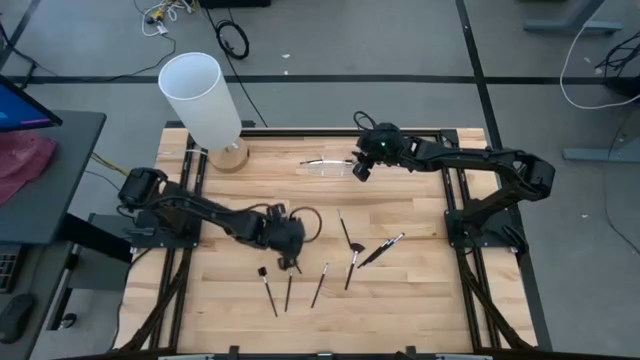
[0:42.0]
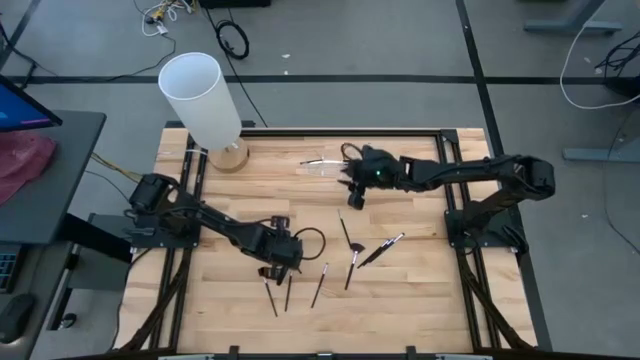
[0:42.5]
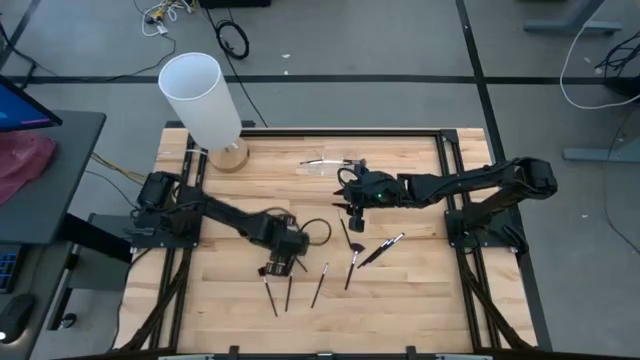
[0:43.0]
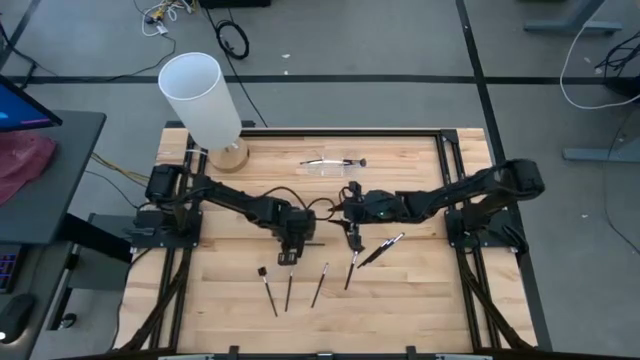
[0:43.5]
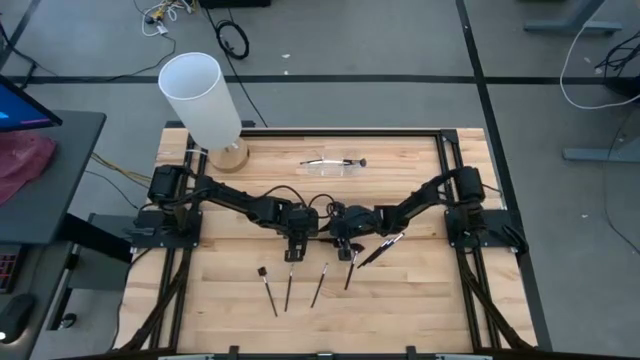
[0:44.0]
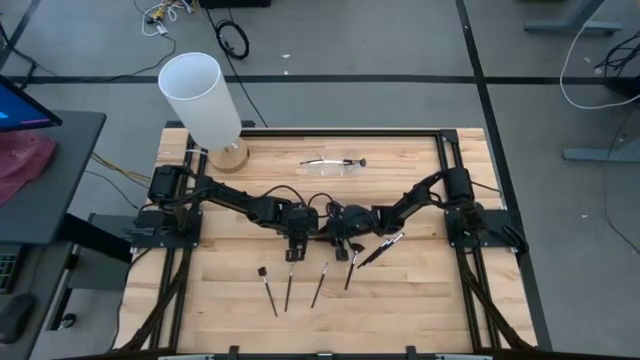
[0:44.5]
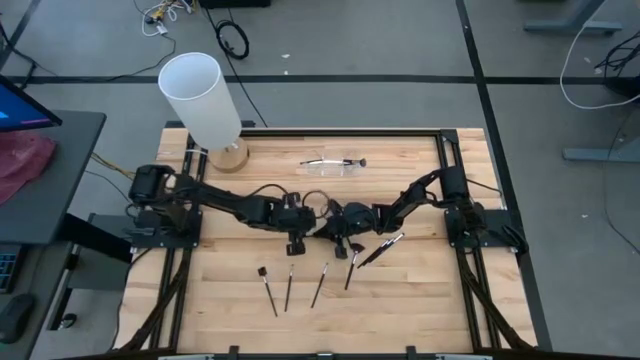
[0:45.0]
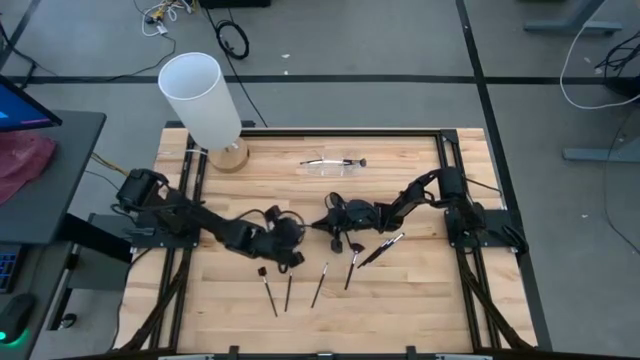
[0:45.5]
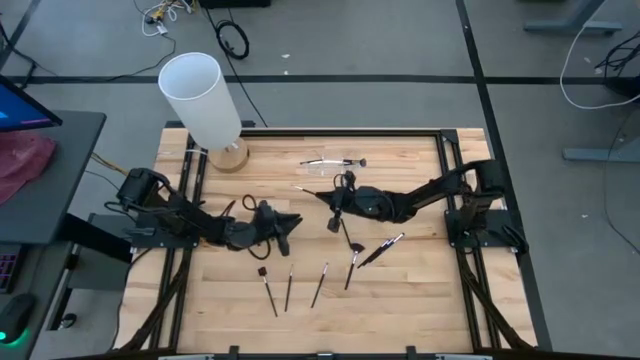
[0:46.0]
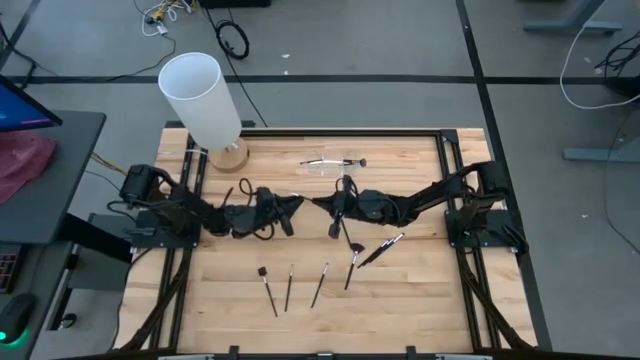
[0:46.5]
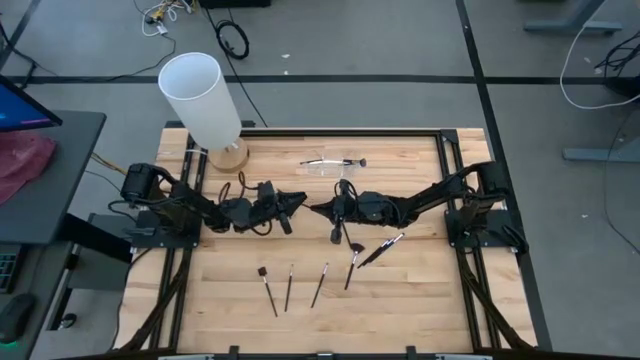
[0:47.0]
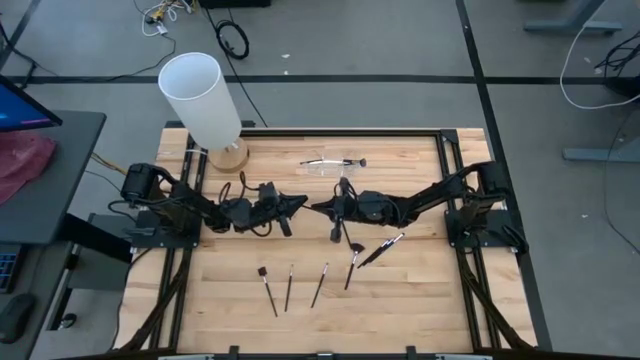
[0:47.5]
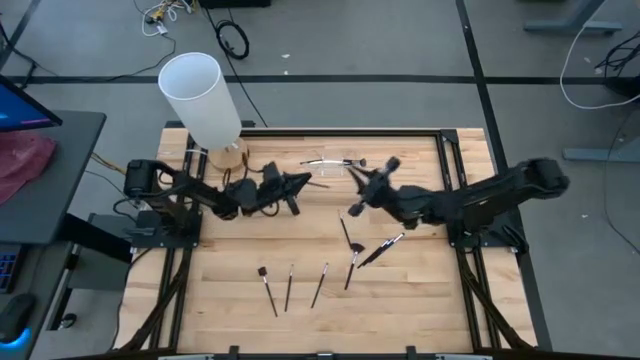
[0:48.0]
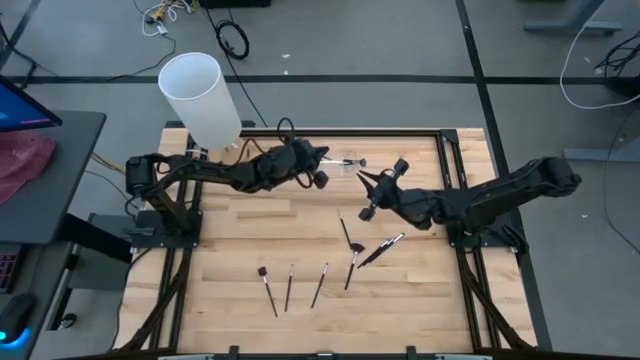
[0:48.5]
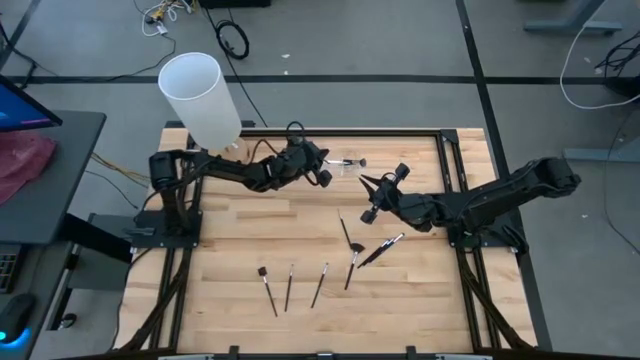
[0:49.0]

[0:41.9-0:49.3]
Task: Pick & Place Makeup Supplies
Put the makeup brush into the transparent organizer

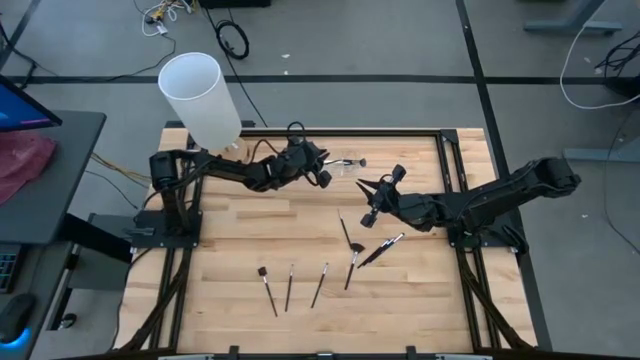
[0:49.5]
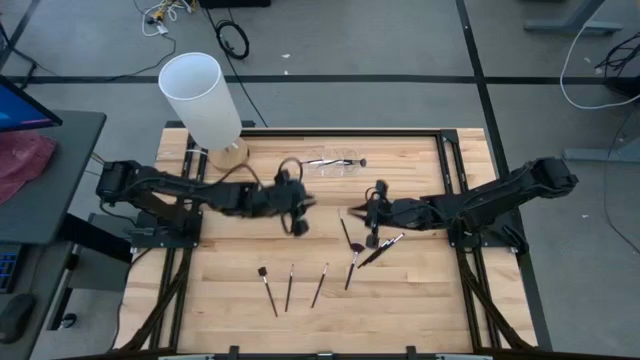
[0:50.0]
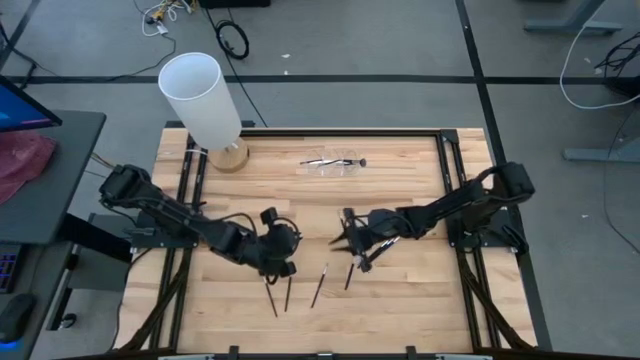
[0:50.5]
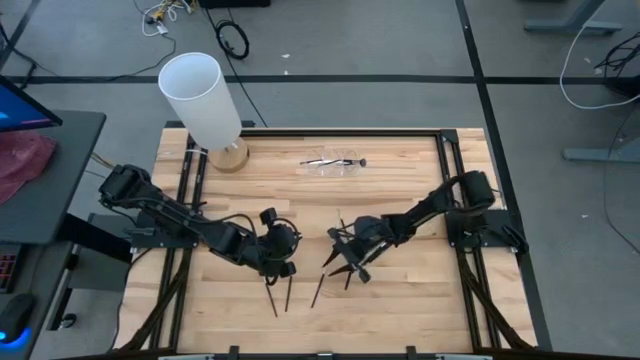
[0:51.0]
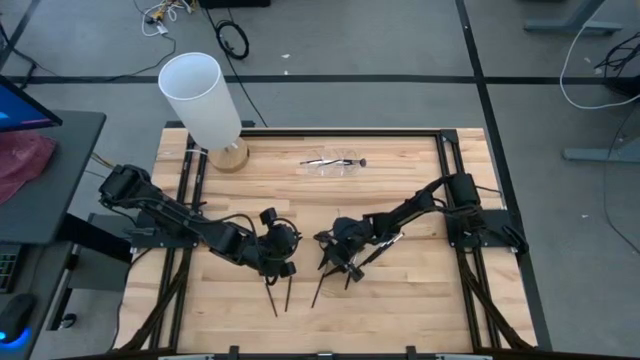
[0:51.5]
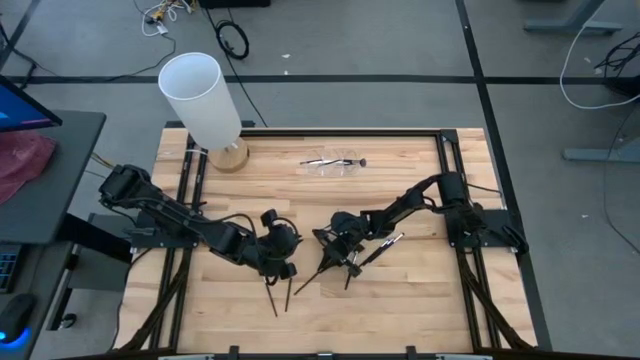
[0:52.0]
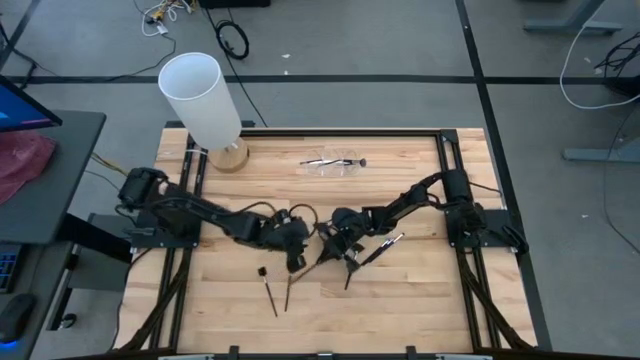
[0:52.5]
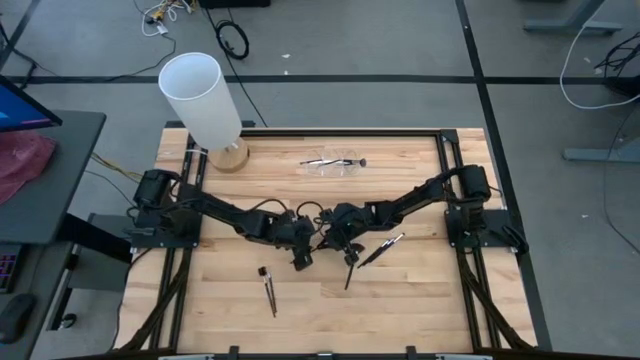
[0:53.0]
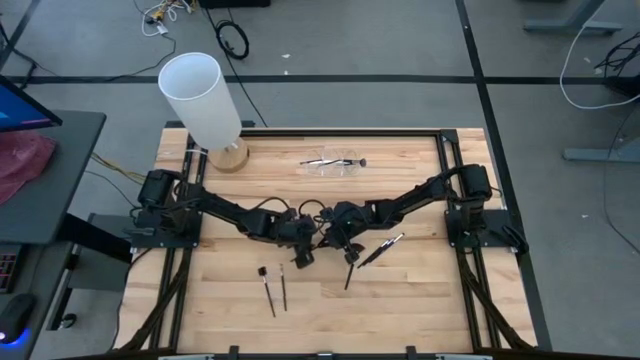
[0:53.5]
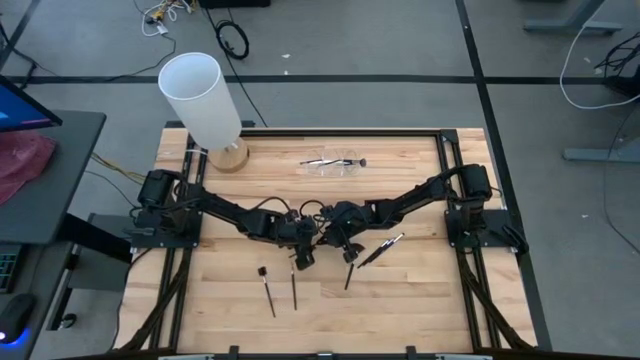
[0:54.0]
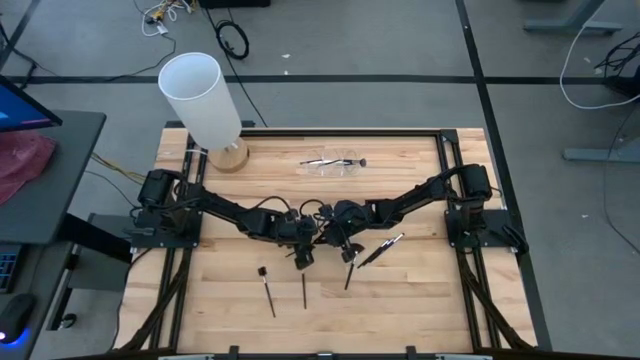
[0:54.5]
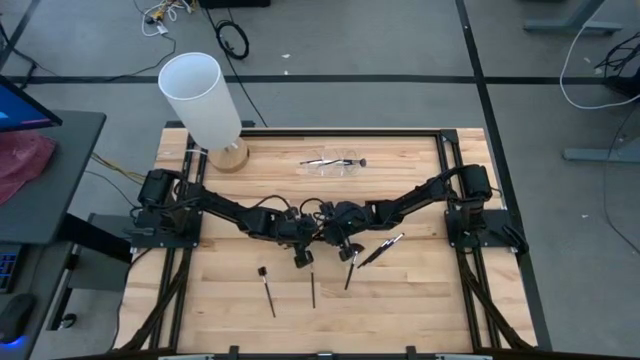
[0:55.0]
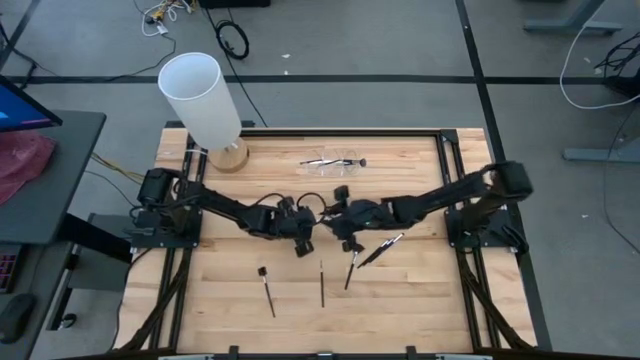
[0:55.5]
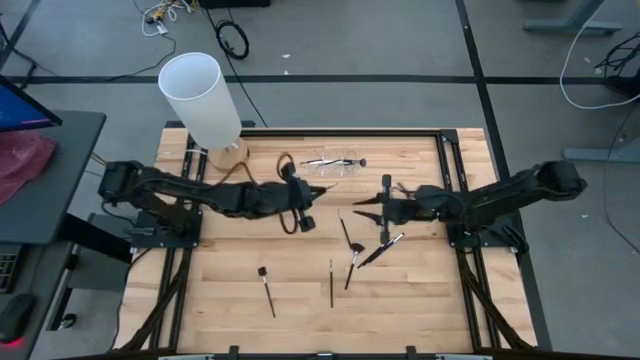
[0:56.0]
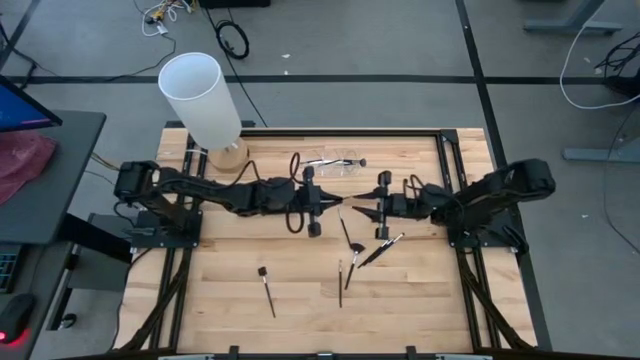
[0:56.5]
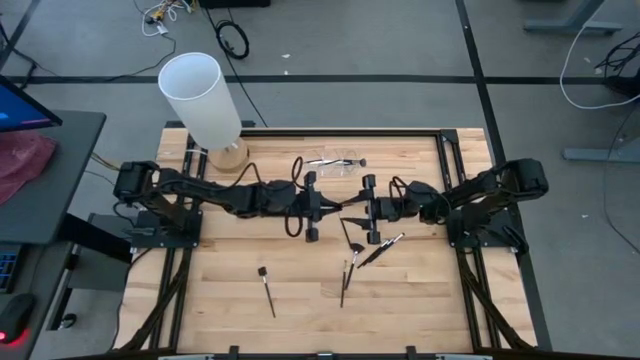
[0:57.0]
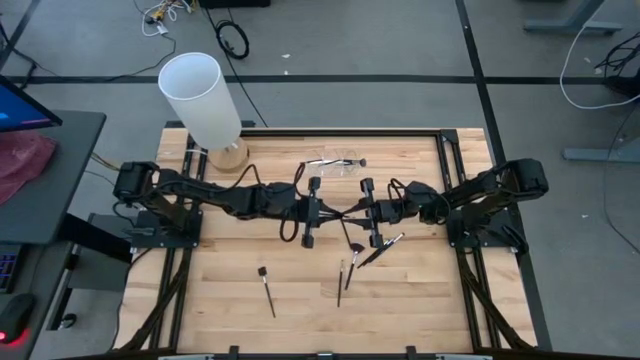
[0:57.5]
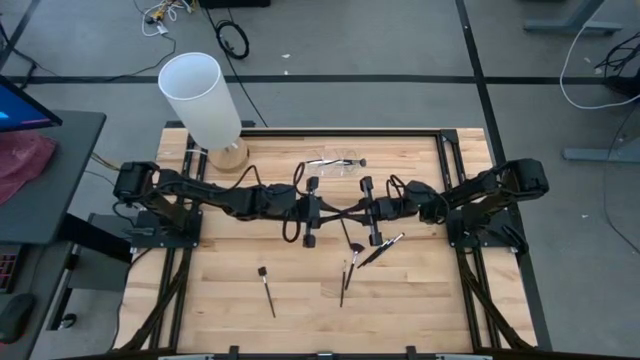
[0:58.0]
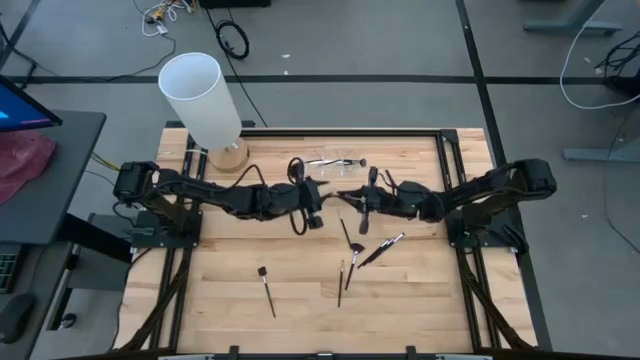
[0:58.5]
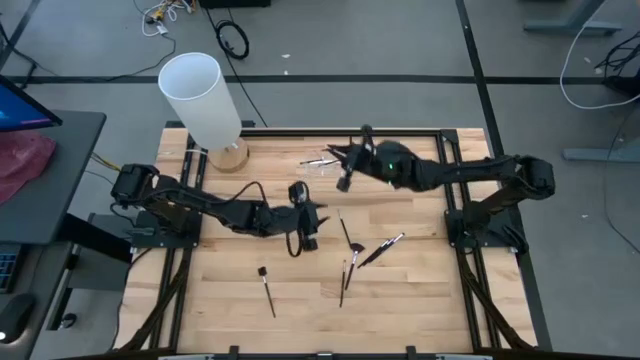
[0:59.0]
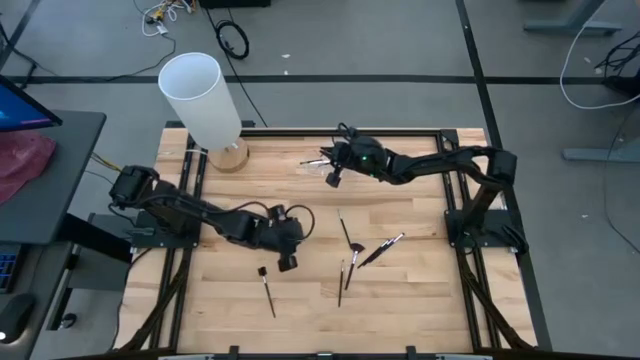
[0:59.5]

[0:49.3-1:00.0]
Put the makeup brush into the transparent organizer

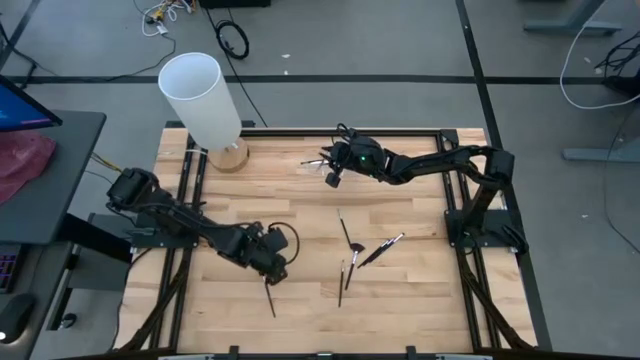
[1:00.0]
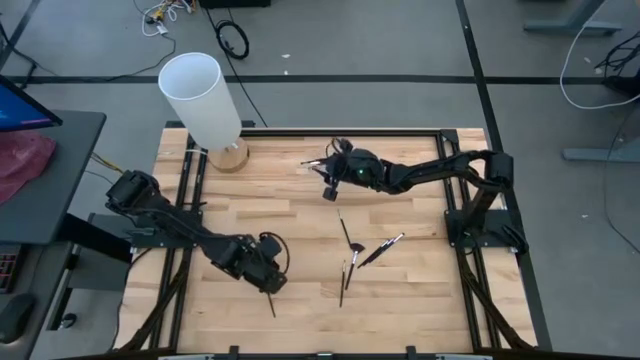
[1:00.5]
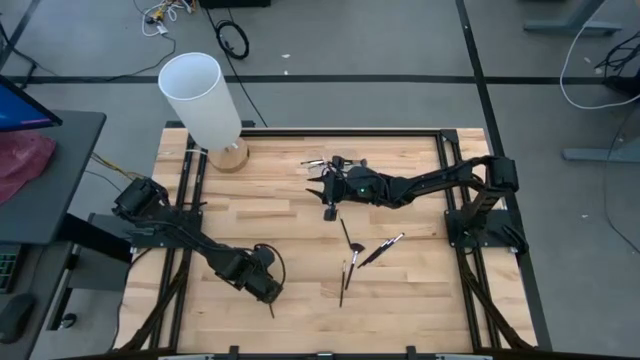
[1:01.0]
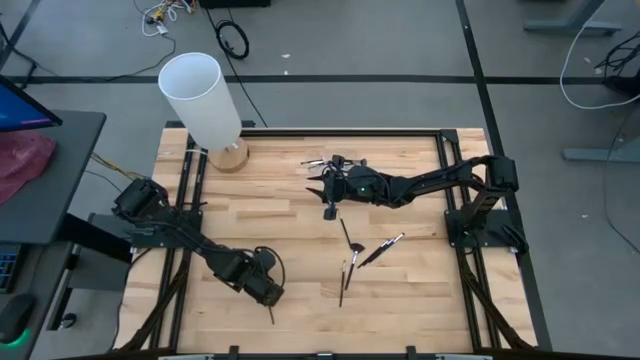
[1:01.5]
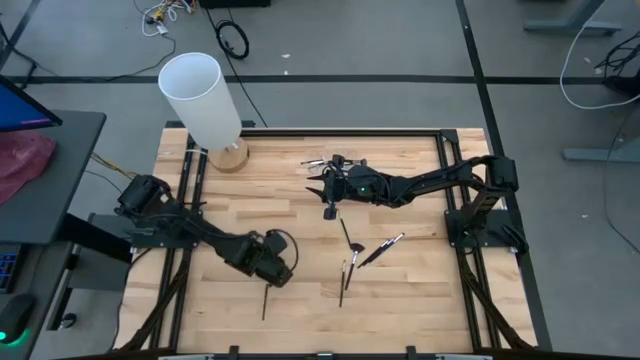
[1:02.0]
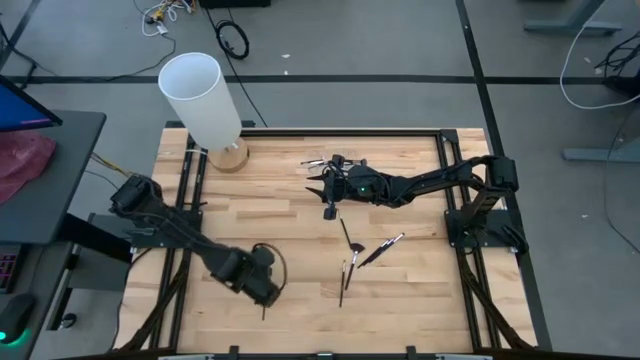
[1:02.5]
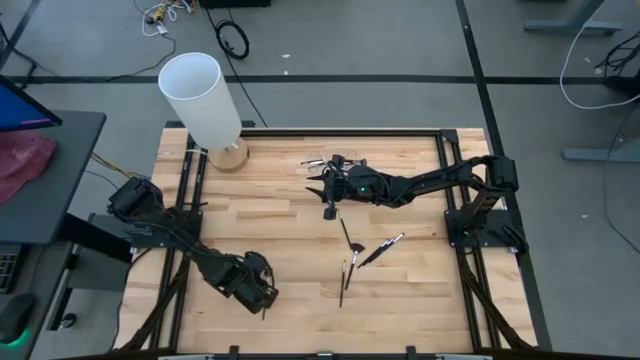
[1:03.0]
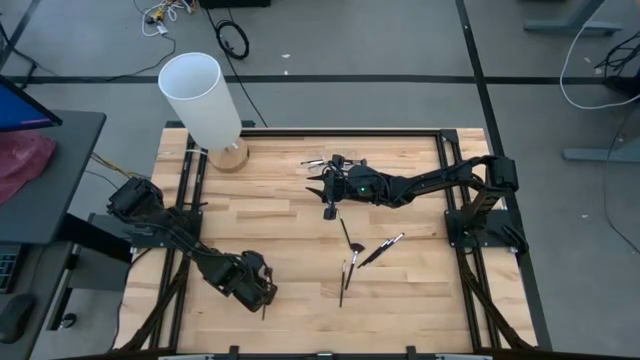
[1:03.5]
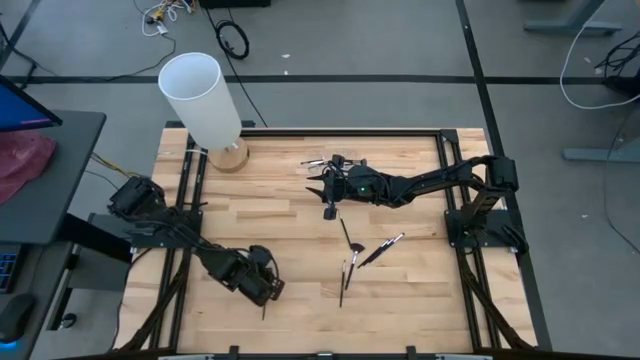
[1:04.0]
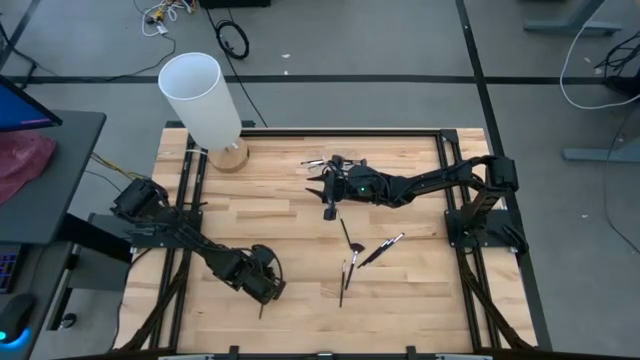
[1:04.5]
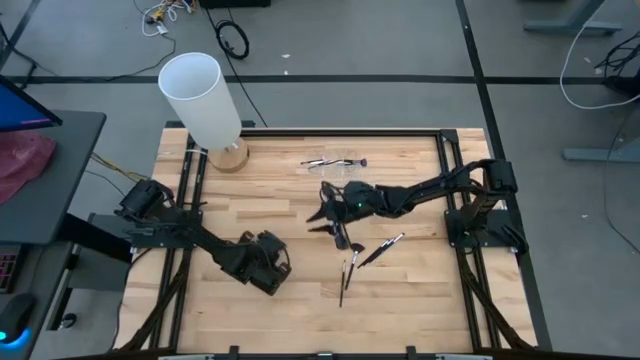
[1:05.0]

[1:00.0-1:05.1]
Put the makeup brush into the transparent organizer
